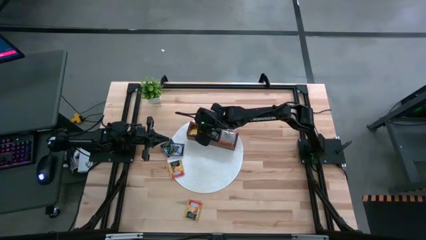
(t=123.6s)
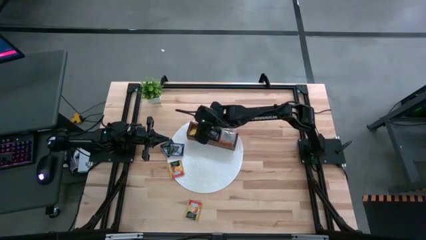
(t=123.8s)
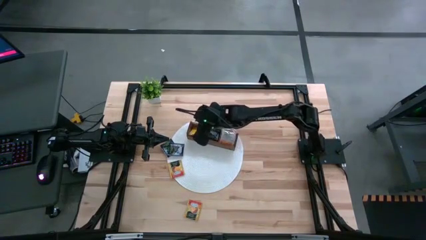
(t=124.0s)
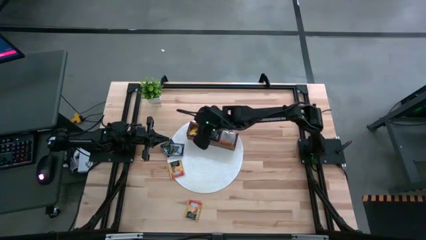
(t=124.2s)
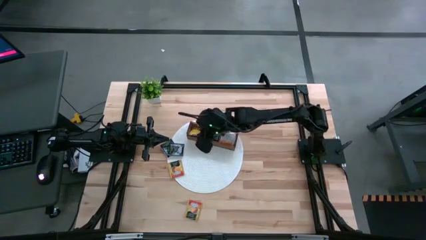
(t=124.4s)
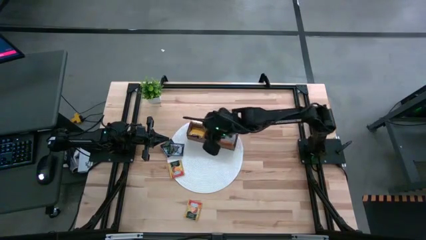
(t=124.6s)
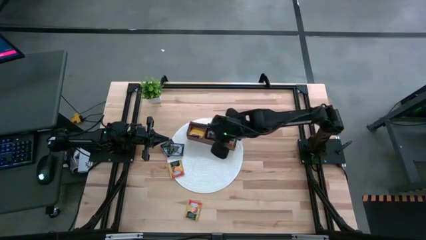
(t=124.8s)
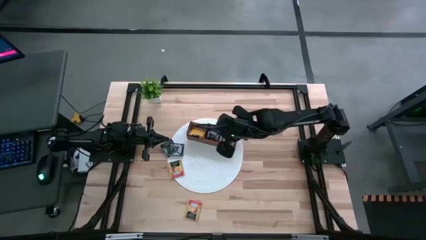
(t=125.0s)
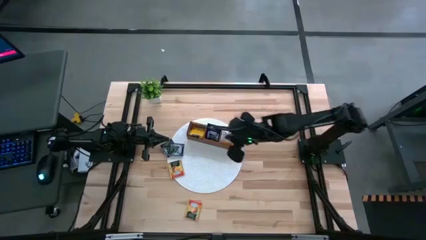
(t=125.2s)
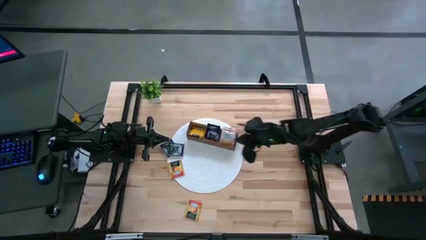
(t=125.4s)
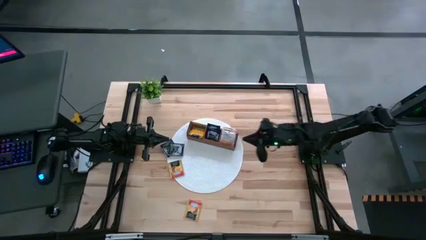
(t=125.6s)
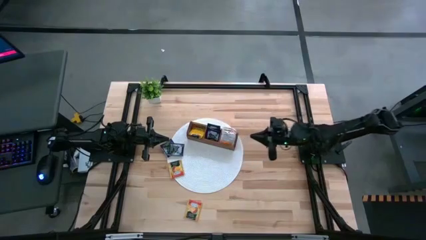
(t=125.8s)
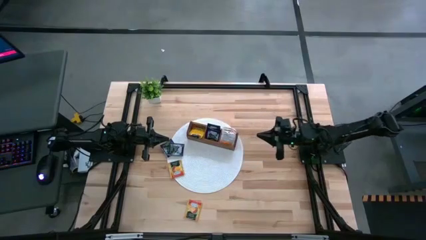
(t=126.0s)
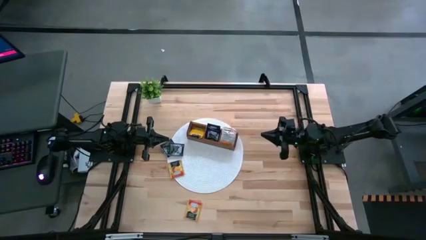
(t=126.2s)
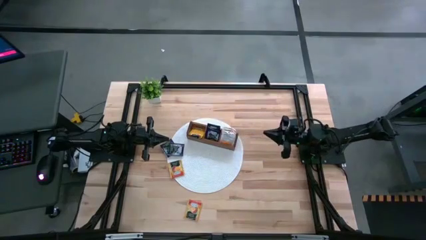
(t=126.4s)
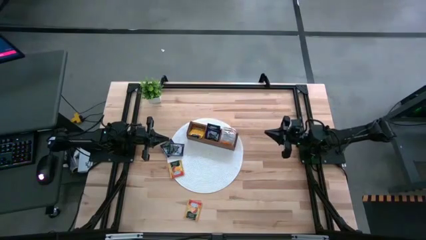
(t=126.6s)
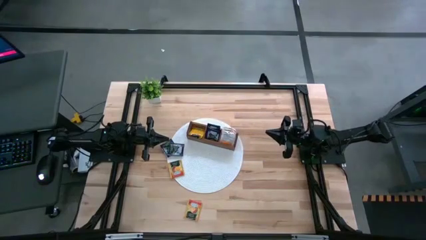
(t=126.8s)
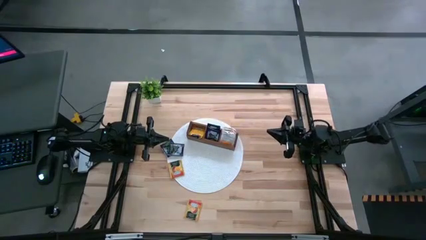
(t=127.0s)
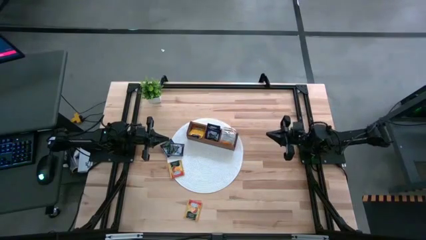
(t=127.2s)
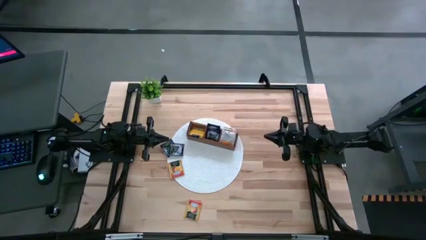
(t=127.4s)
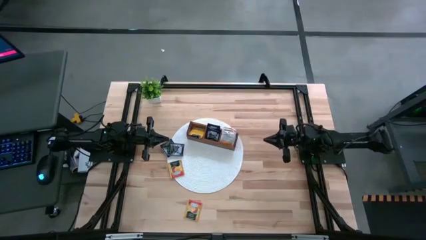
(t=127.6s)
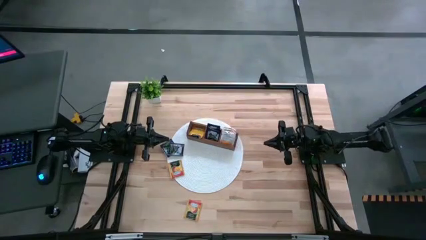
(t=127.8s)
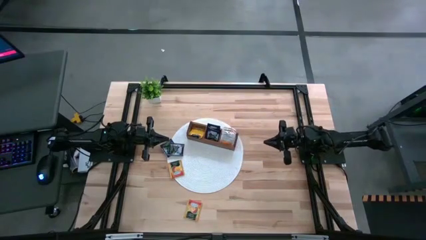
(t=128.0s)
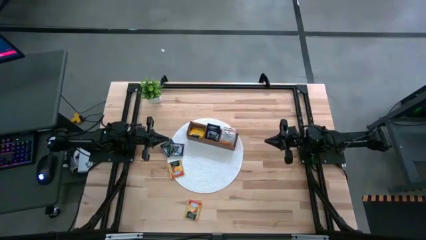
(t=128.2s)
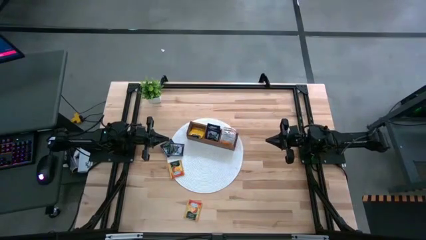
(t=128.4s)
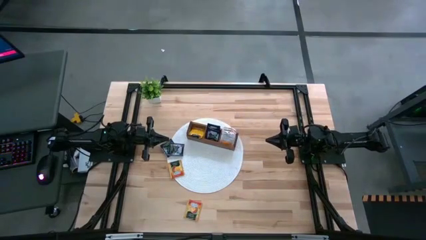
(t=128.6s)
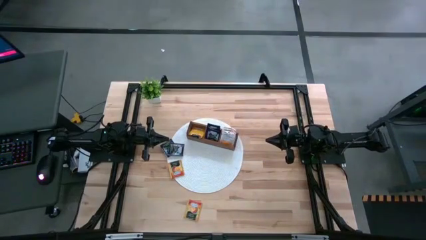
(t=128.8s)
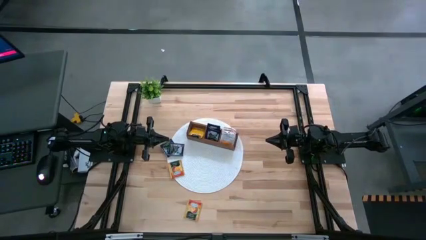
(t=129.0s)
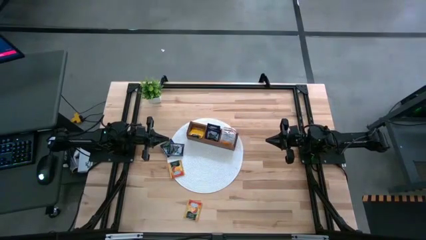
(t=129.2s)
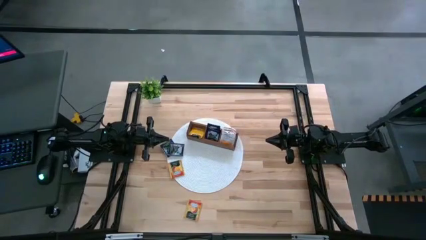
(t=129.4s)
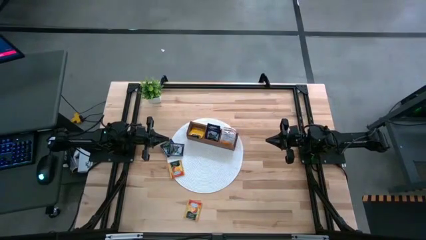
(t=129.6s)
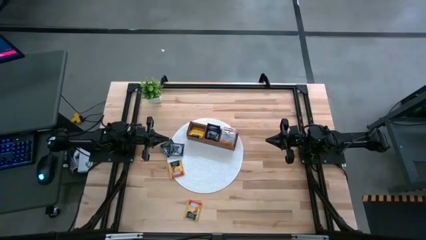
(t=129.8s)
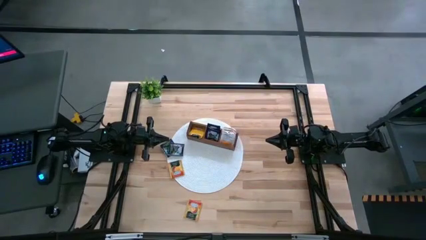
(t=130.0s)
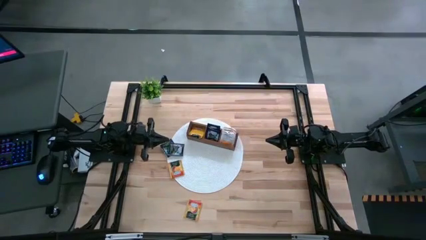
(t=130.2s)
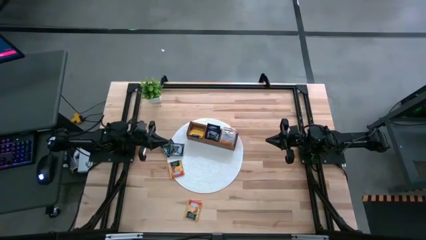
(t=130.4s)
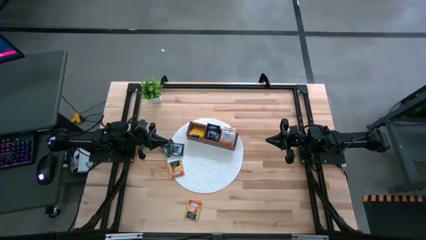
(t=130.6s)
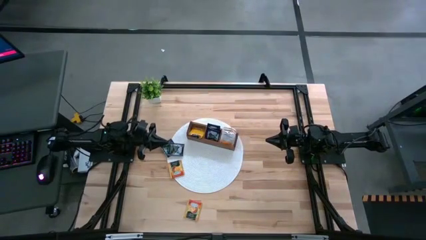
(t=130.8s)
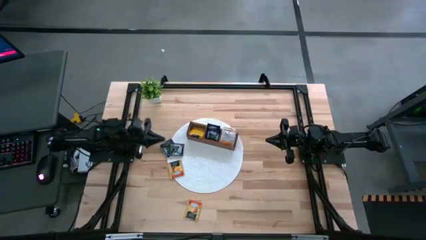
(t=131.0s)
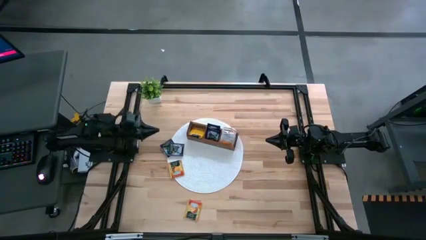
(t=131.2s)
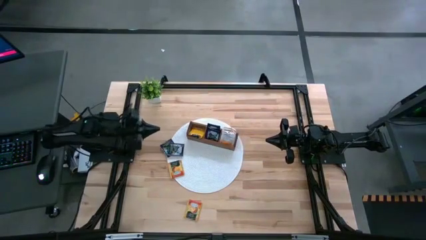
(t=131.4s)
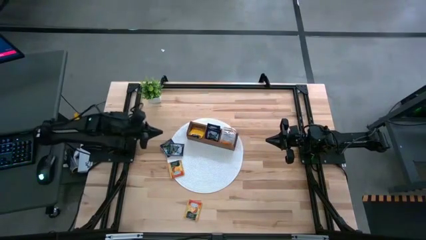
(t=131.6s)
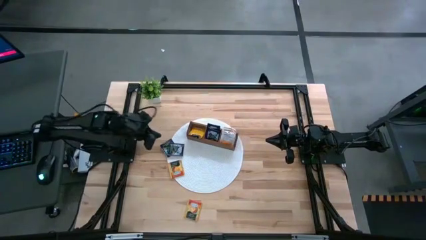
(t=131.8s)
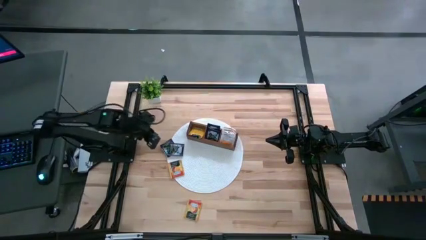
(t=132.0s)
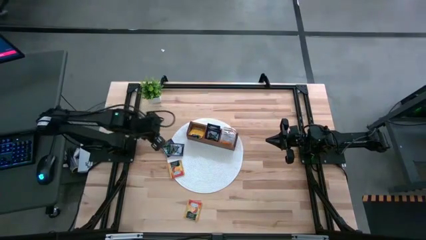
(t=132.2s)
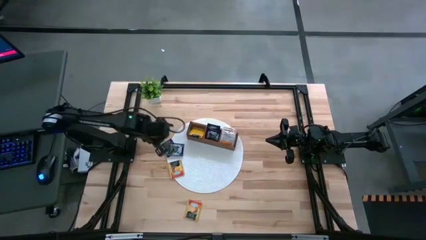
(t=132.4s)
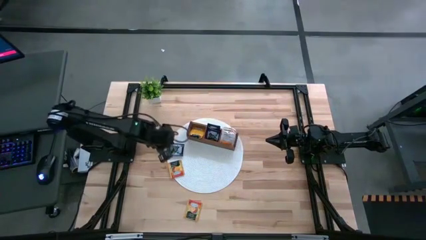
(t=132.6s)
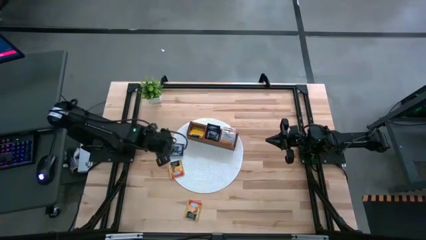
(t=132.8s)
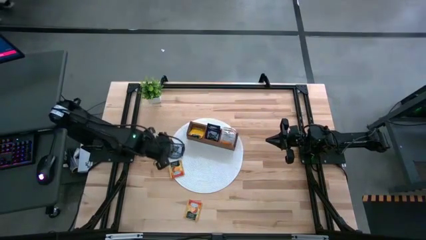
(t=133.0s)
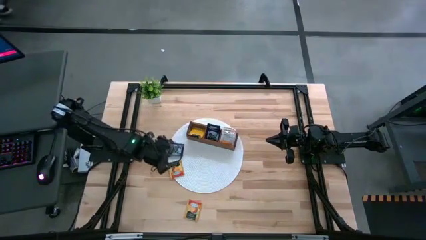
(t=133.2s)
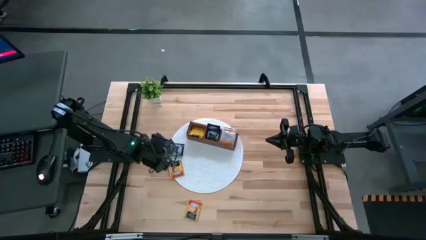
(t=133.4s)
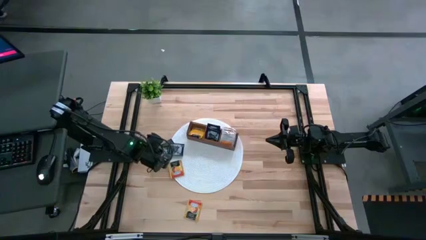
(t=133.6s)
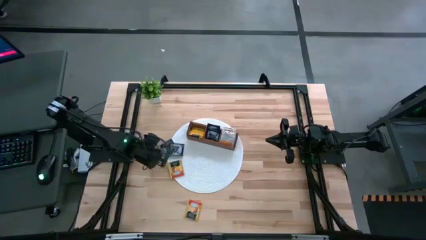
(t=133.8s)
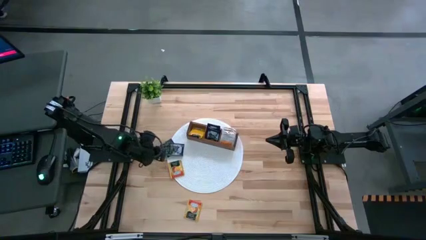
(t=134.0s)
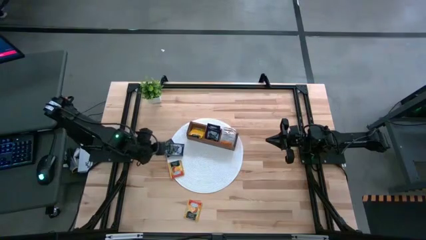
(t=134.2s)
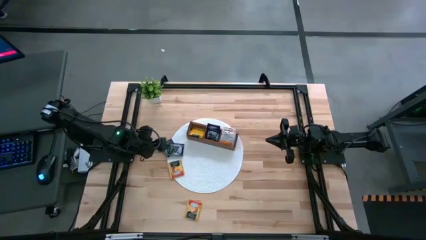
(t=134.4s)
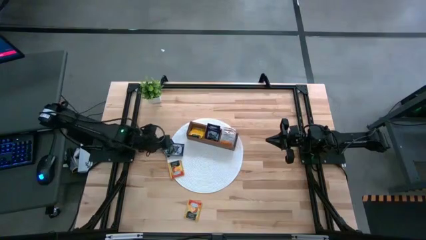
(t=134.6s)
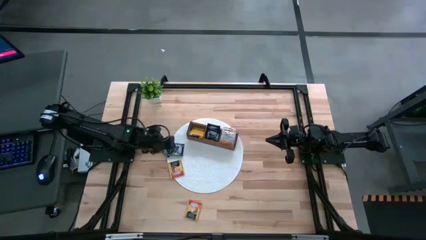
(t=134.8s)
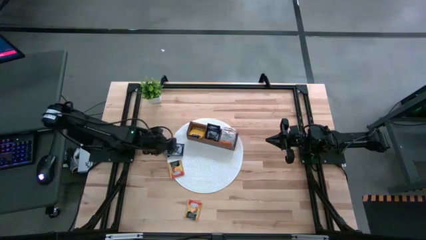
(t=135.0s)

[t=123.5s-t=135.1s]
Task: Pick & Place Tea
Put the blue tea bag into the middle section of the wooden organizer
